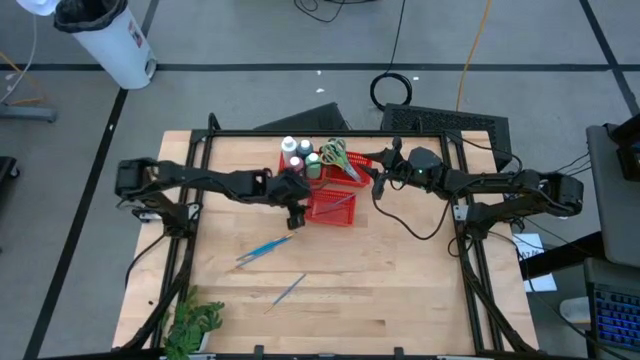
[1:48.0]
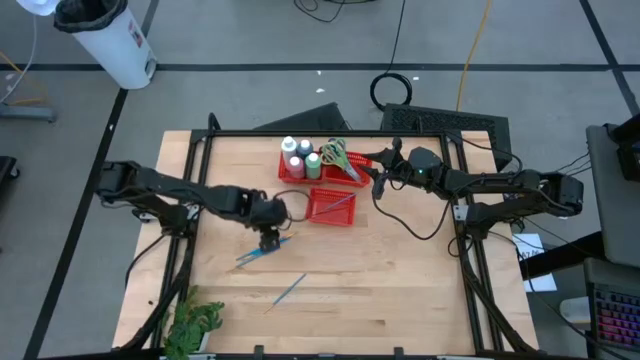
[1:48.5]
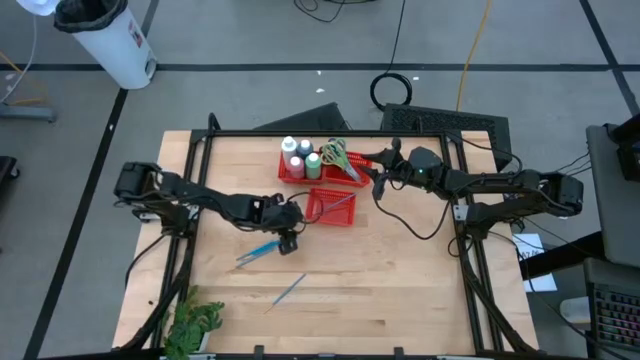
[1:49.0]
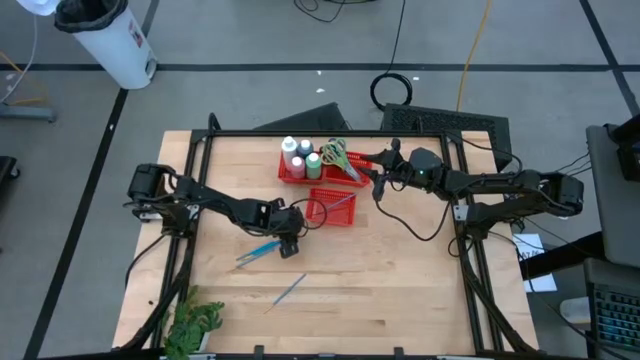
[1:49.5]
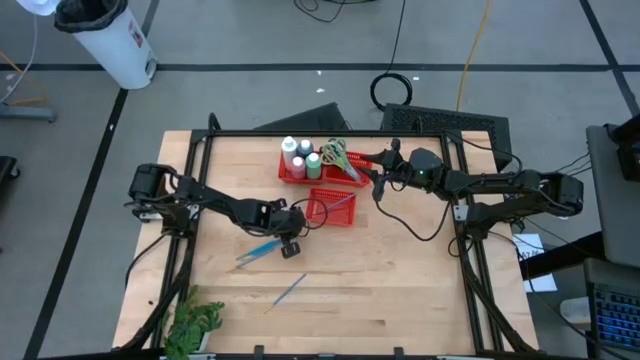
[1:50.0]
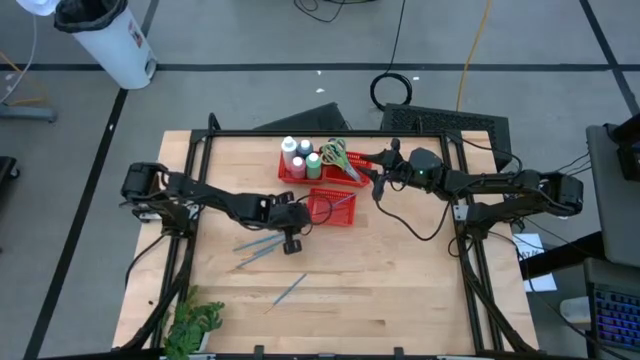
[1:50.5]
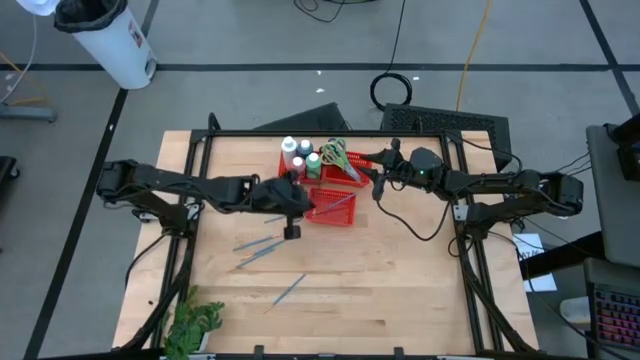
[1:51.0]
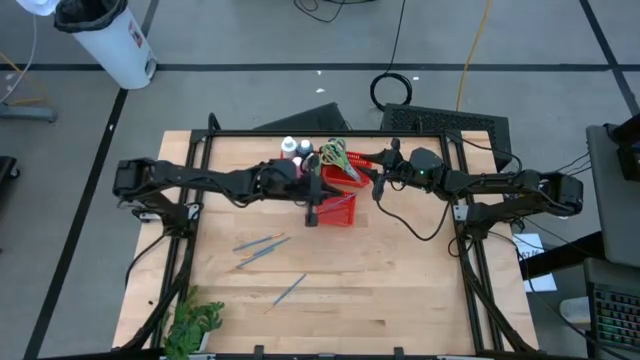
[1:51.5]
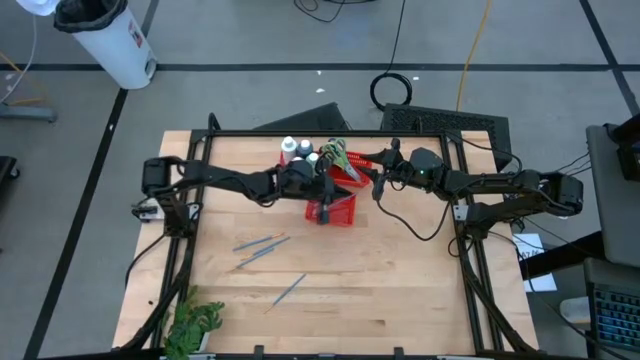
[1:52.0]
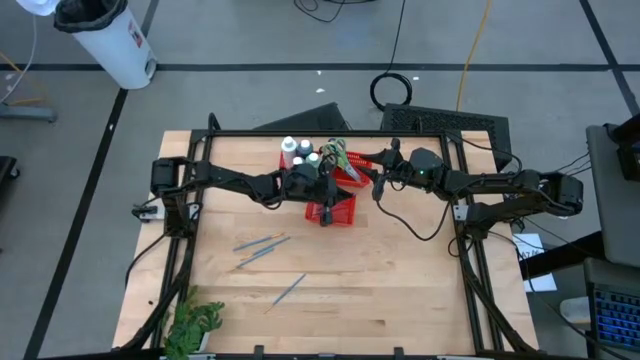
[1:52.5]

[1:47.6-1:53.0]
Task: Pick & Place Paint Supplies
Put the blue paint brush into the bottom red bin

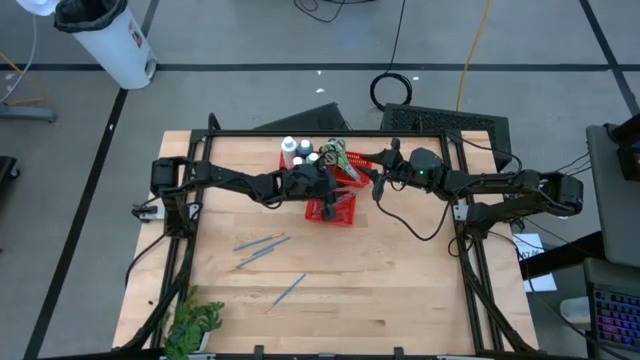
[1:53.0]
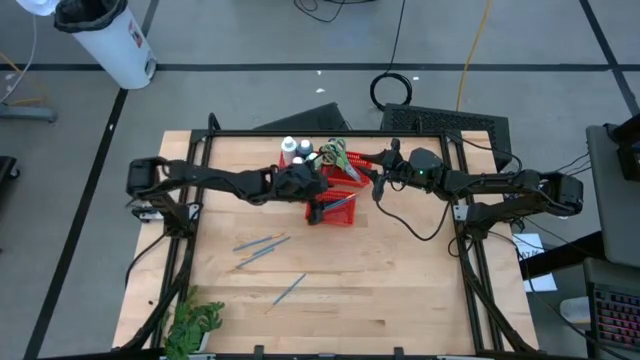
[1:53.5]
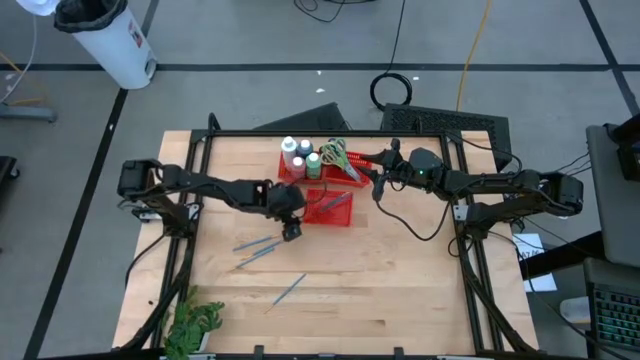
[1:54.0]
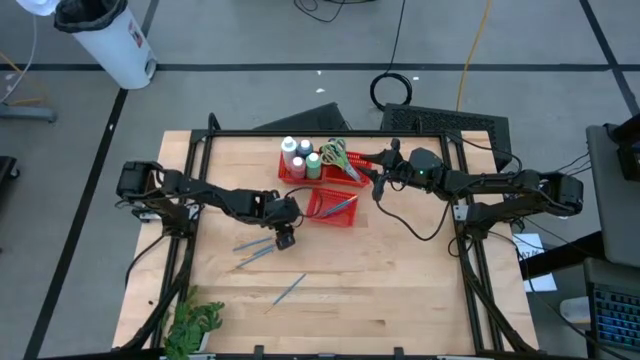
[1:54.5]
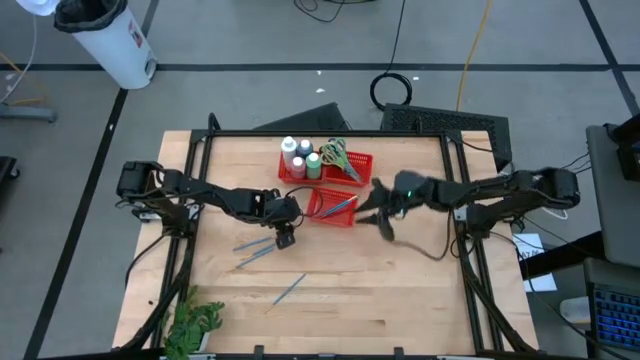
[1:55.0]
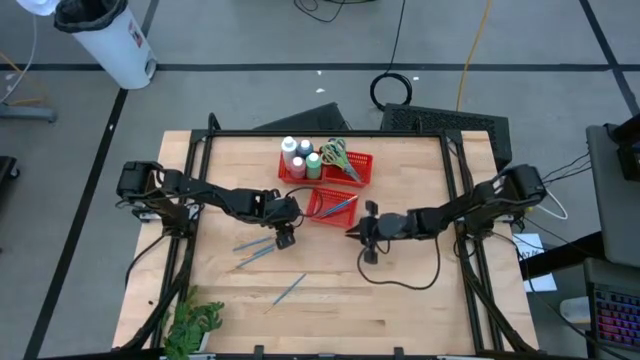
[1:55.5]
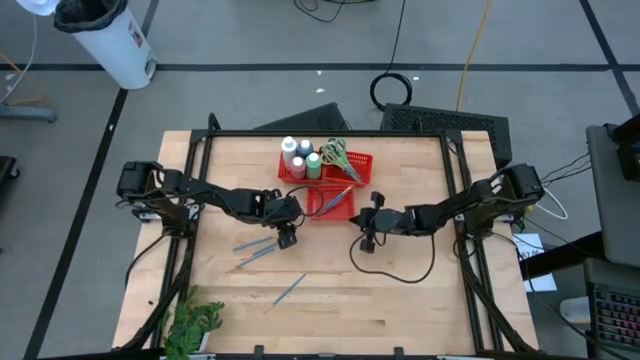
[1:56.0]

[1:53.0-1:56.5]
Adjust the bottom red bin

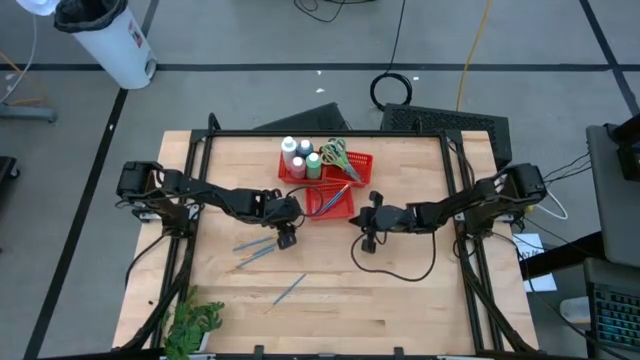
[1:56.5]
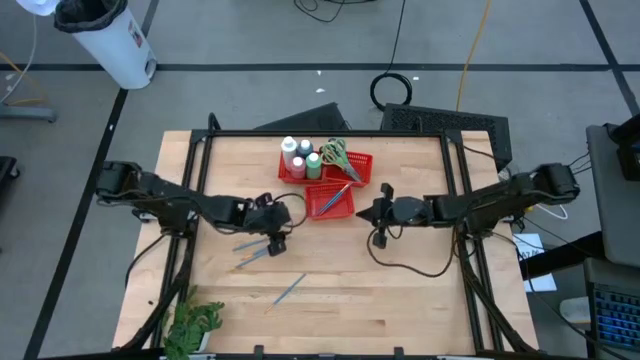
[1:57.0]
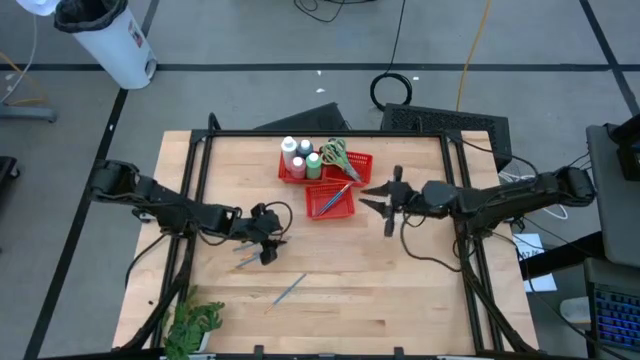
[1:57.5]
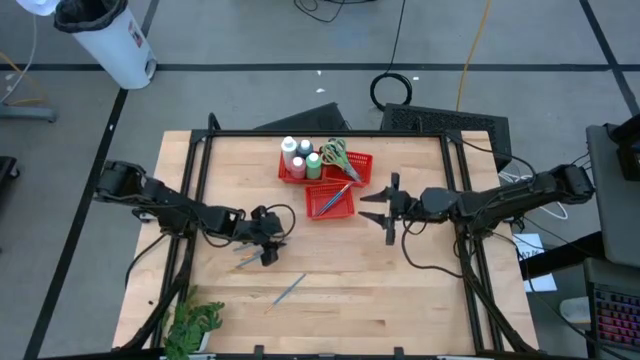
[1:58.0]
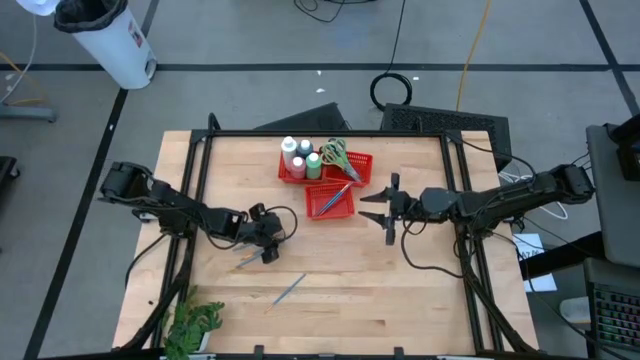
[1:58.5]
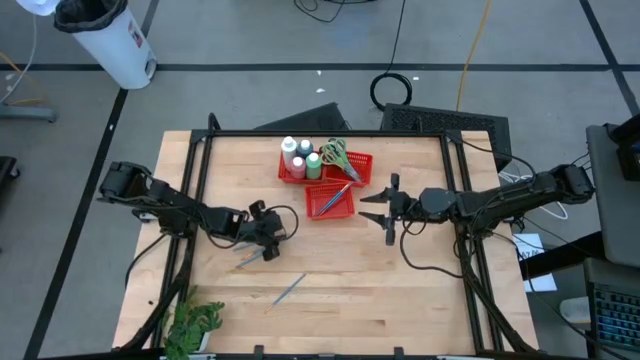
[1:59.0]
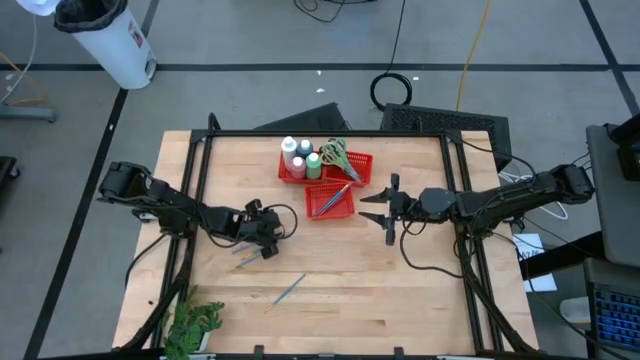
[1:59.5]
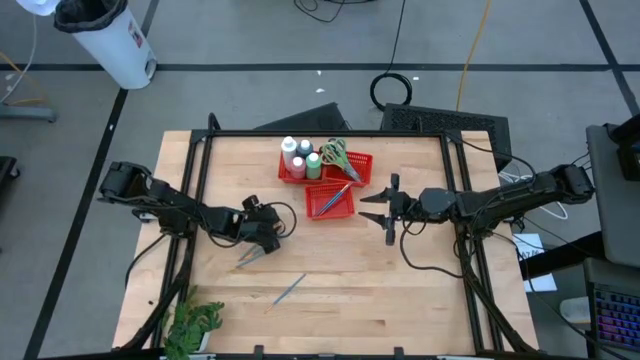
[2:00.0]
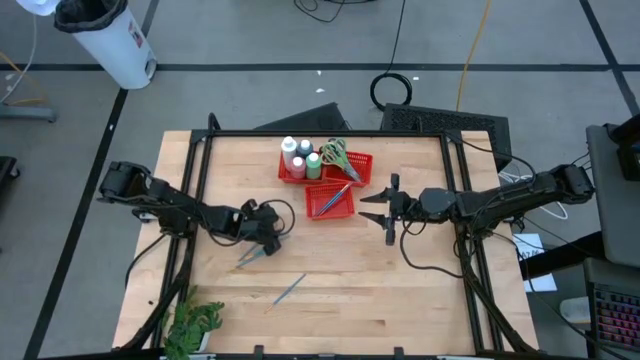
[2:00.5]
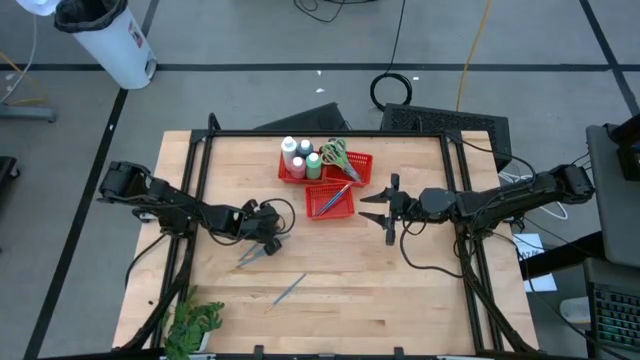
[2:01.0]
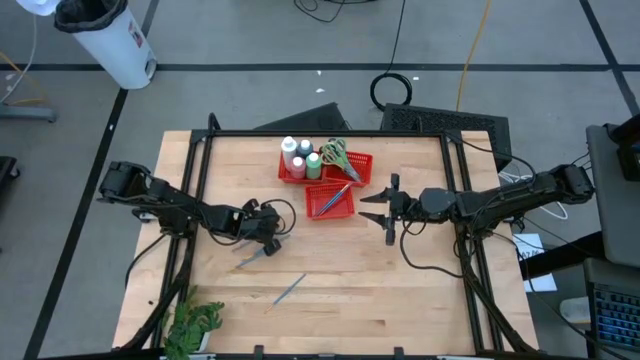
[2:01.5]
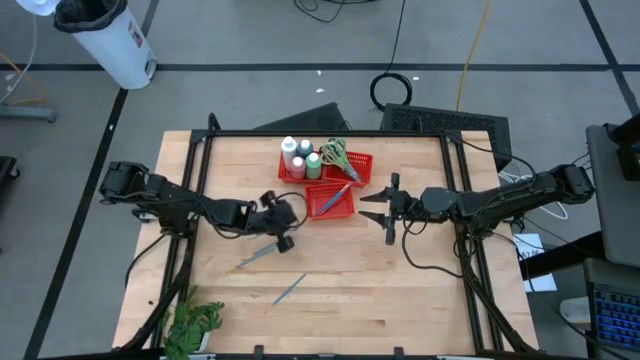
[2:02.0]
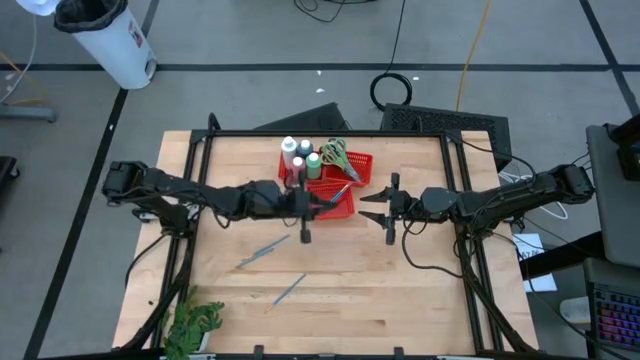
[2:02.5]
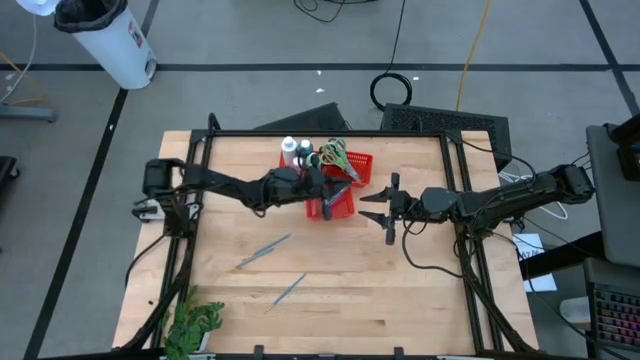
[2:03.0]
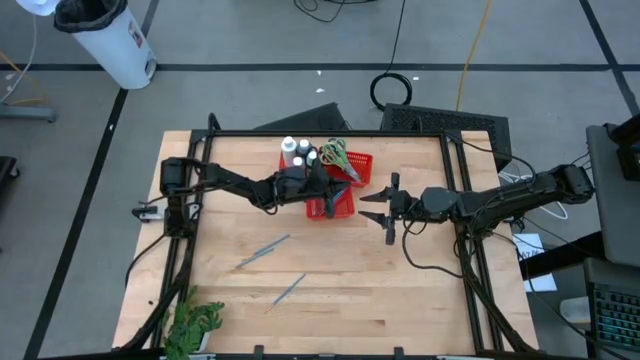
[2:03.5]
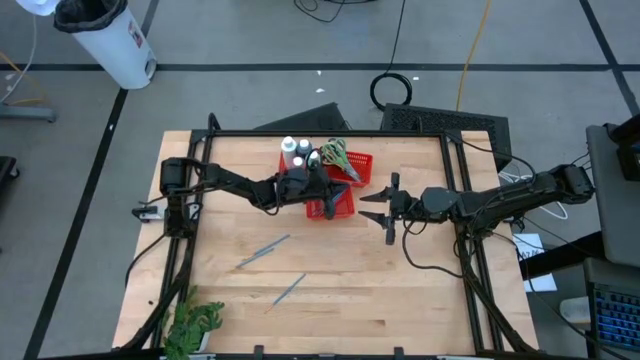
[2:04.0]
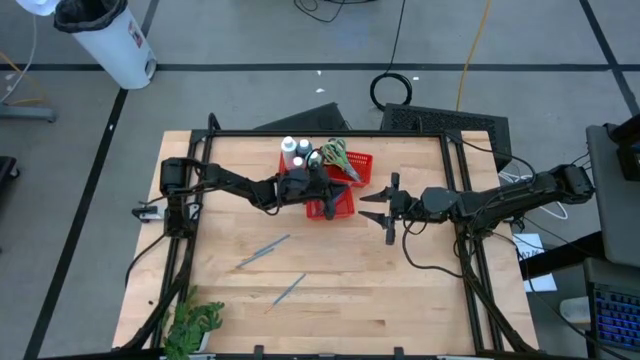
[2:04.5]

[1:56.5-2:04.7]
Put the blue paint brush into the bottom red bin

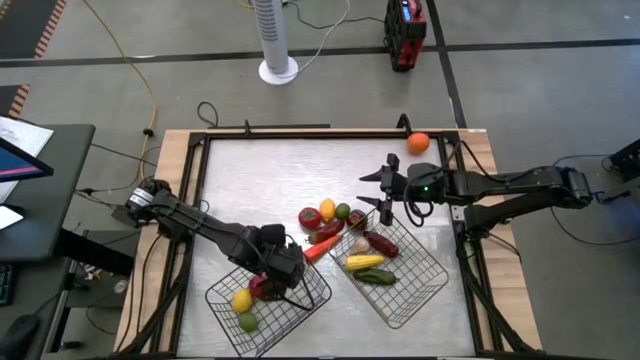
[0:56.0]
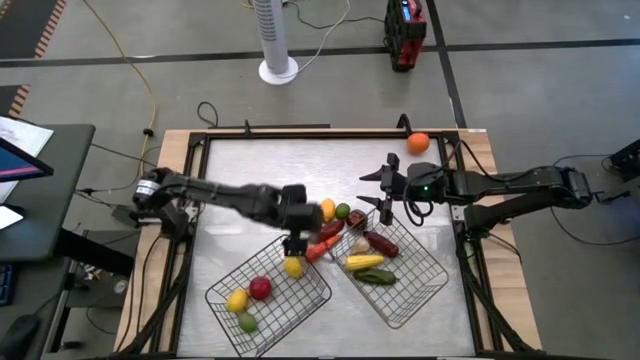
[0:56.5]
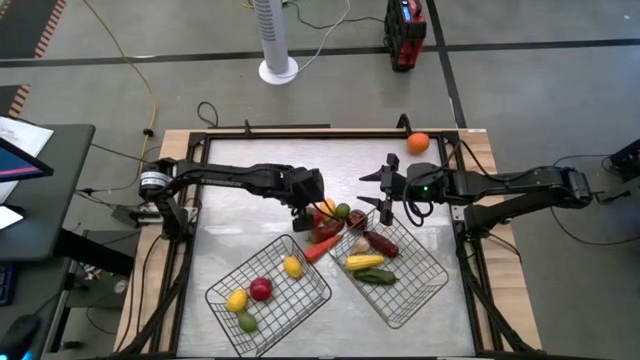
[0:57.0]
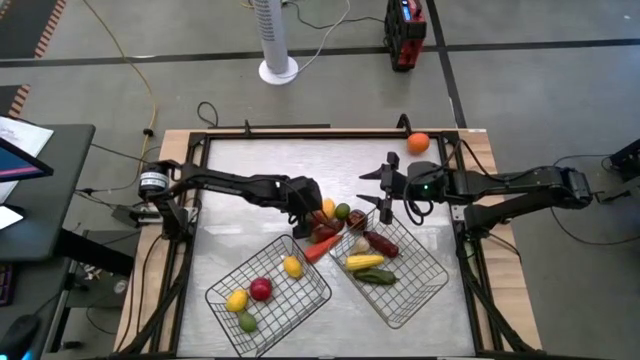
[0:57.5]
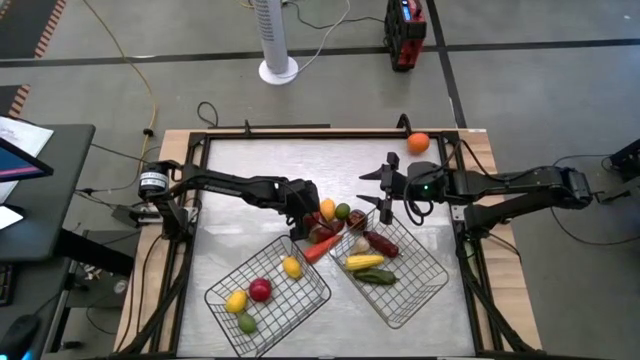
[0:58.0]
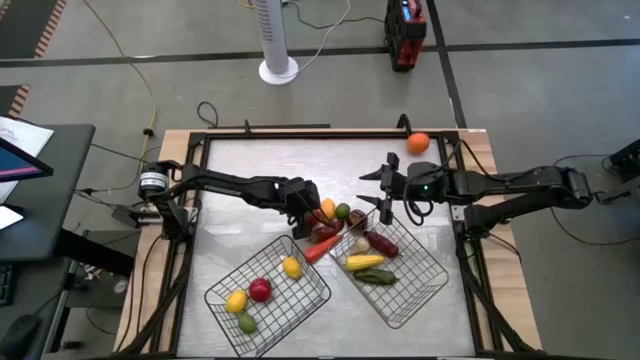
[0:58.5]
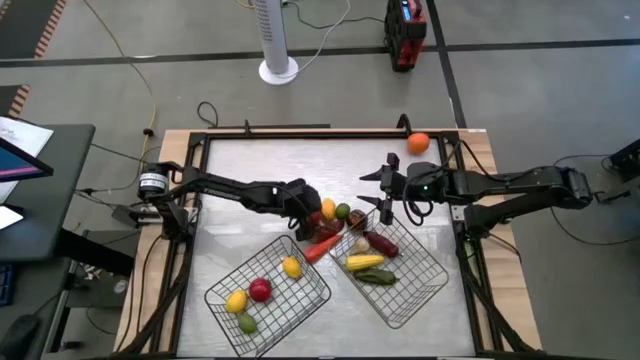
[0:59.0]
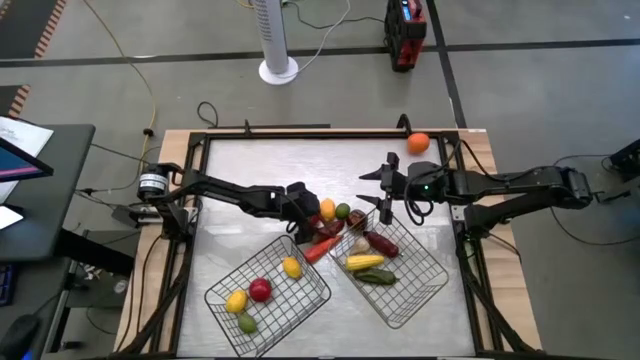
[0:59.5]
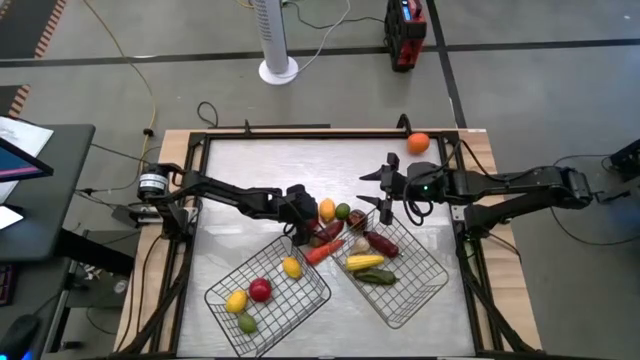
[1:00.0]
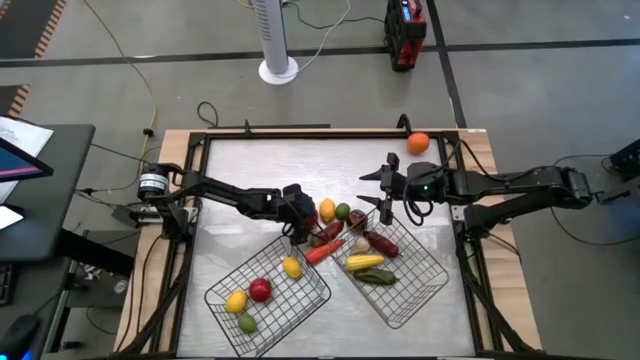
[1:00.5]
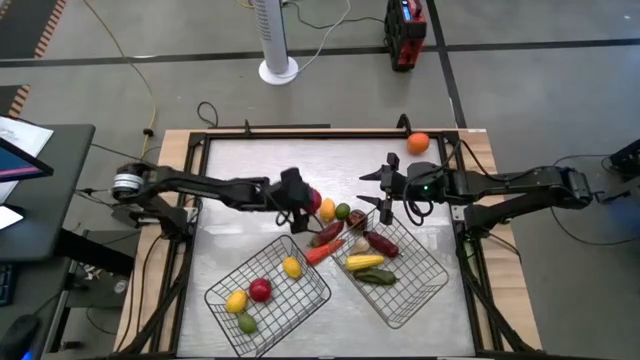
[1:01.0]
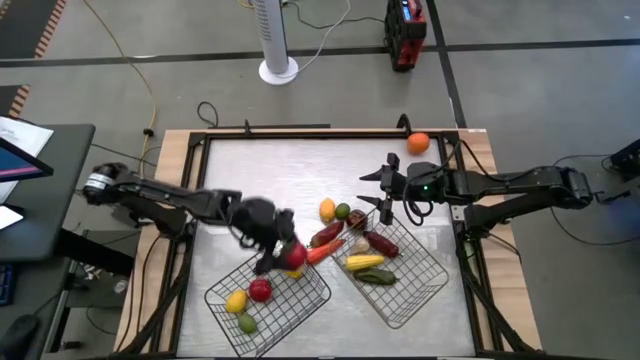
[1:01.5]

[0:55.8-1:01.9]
Task: Sort produce into baskets
Put the red tomato into the black wire basket
